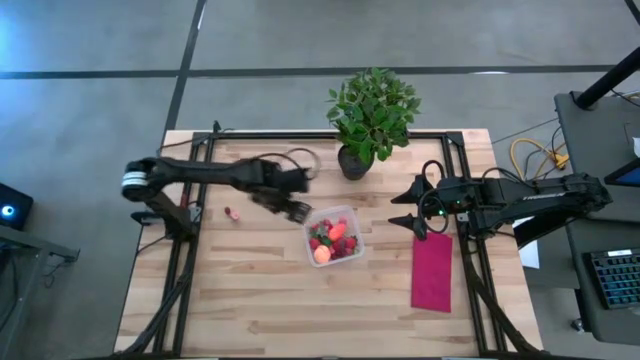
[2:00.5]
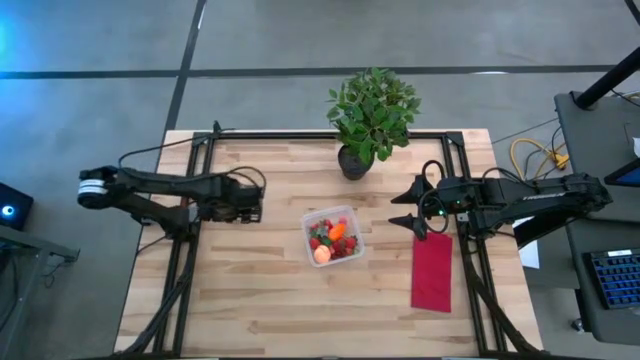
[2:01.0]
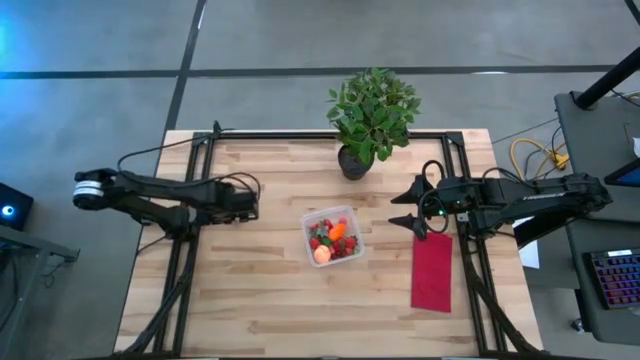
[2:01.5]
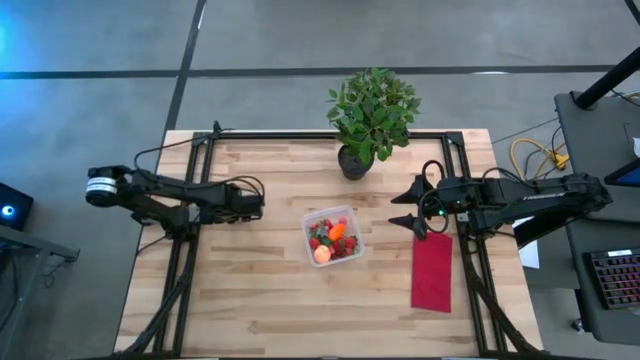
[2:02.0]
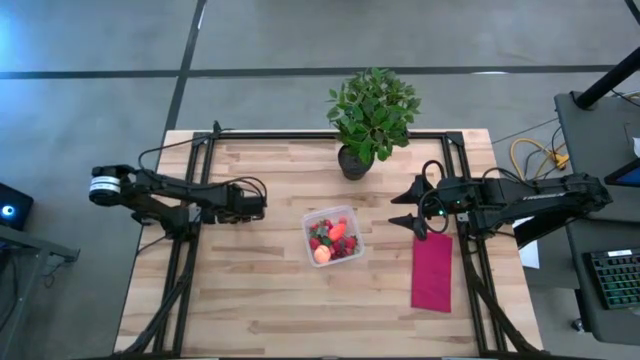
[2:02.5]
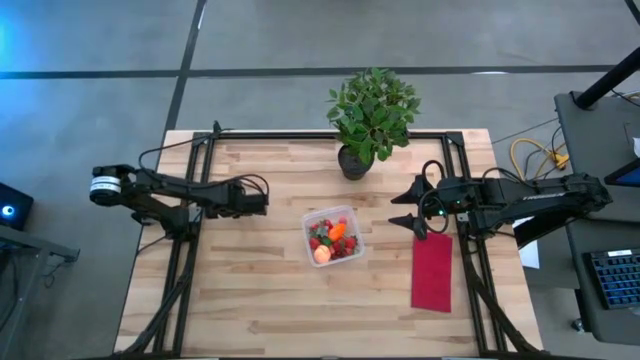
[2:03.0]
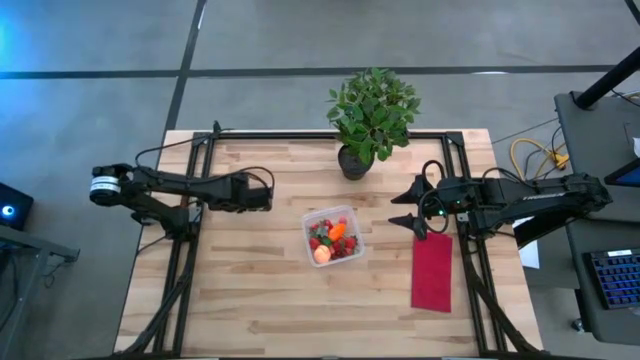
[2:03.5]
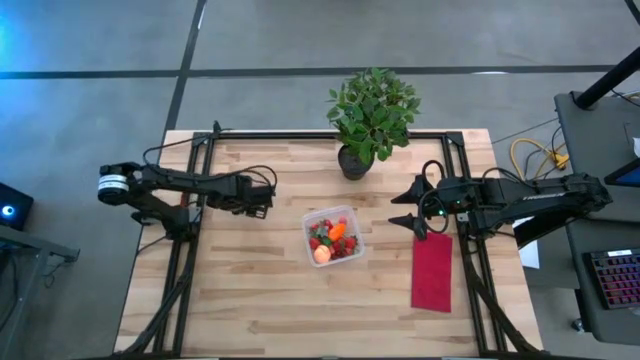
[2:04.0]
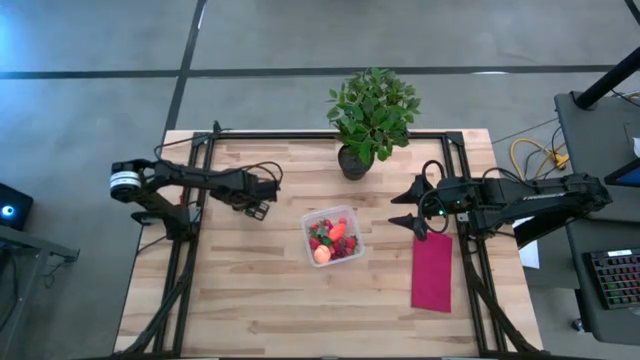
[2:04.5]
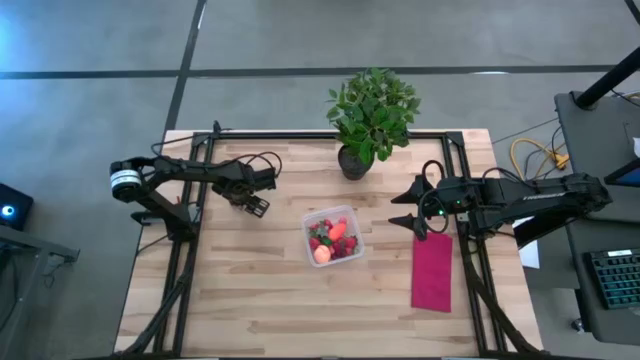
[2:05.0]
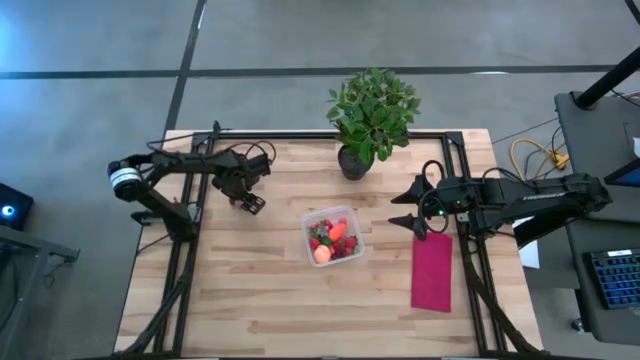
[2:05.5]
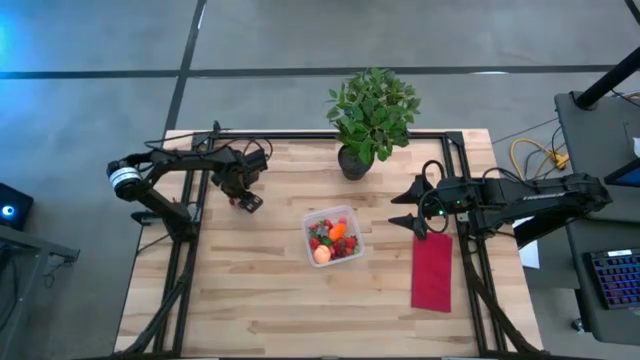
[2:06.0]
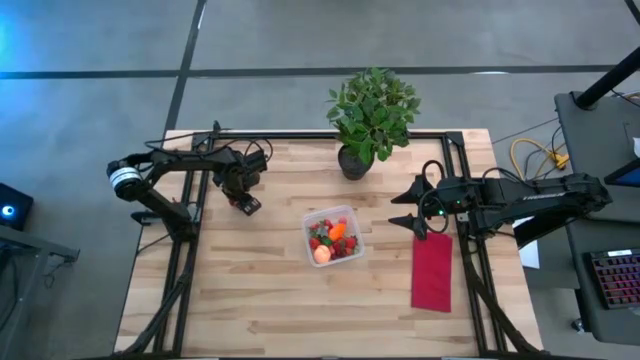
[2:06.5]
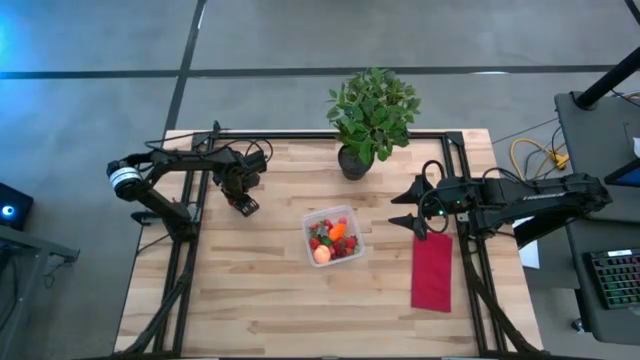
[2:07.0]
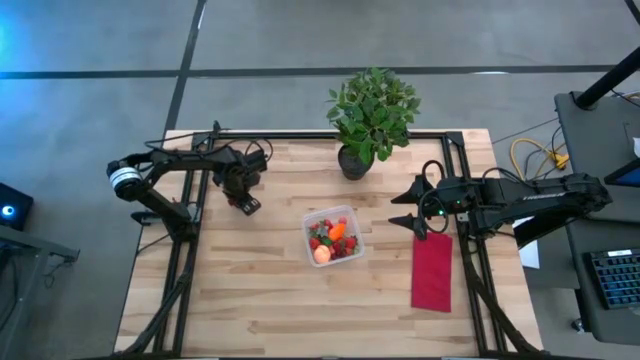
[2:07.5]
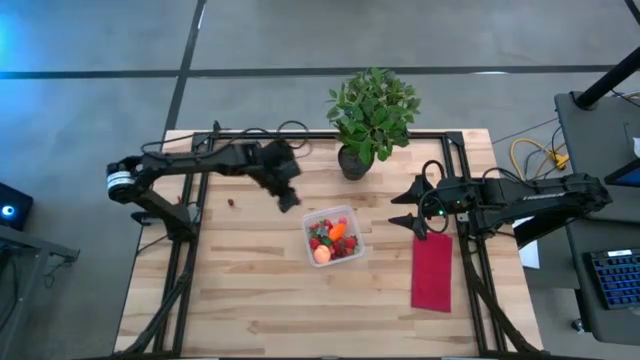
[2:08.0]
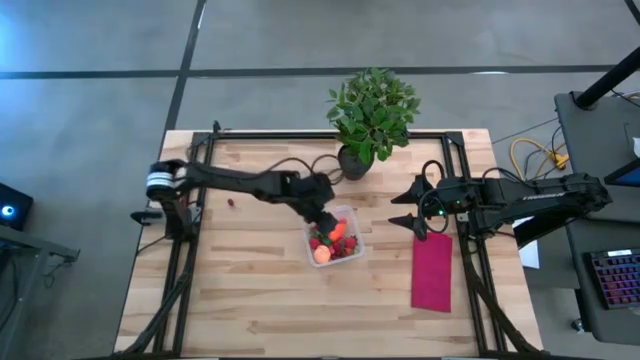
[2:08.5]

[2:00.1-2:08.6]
Task: Pick and placing Produce into tupperware
Put the pink peach into the transparent bin

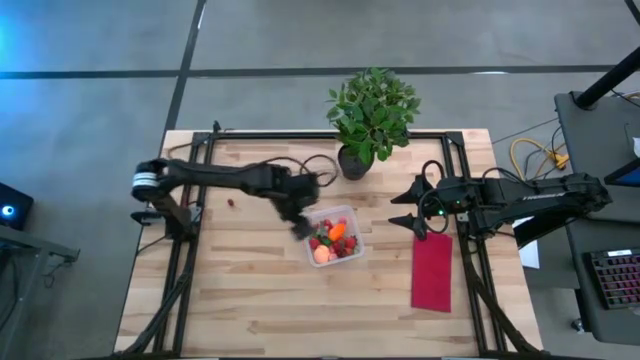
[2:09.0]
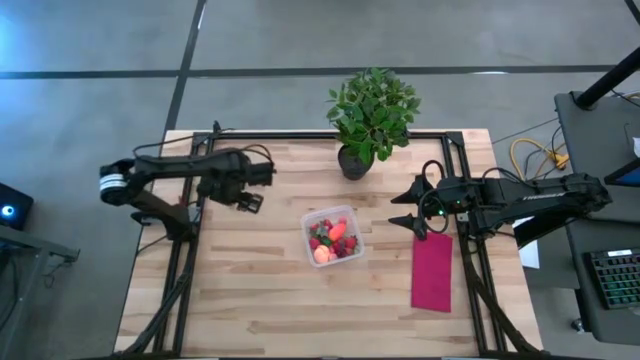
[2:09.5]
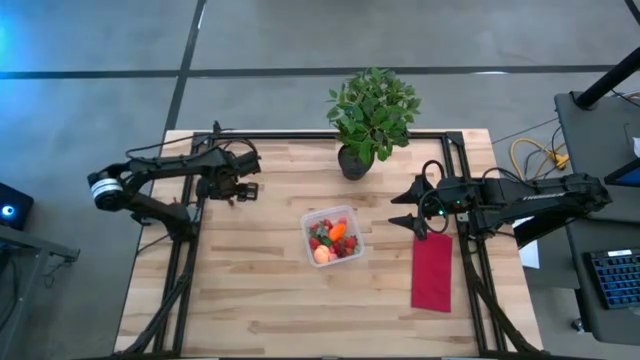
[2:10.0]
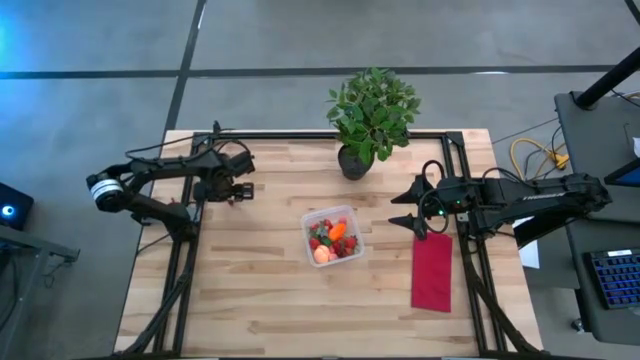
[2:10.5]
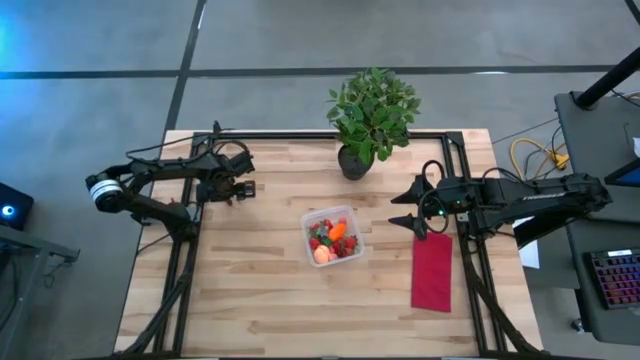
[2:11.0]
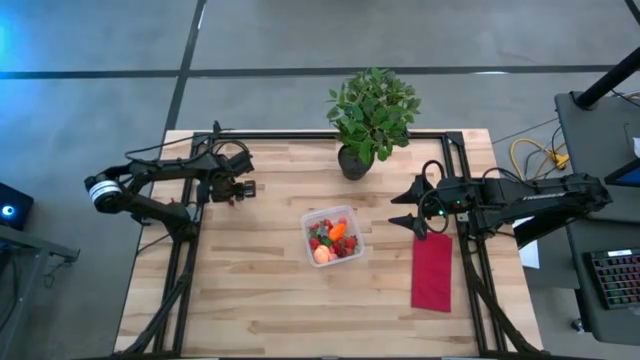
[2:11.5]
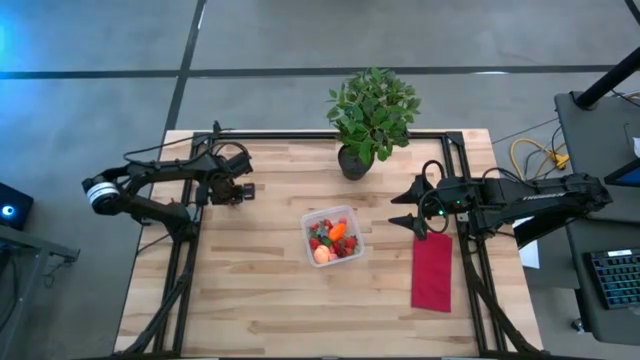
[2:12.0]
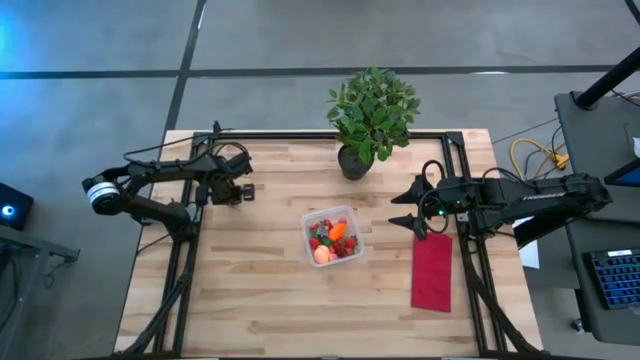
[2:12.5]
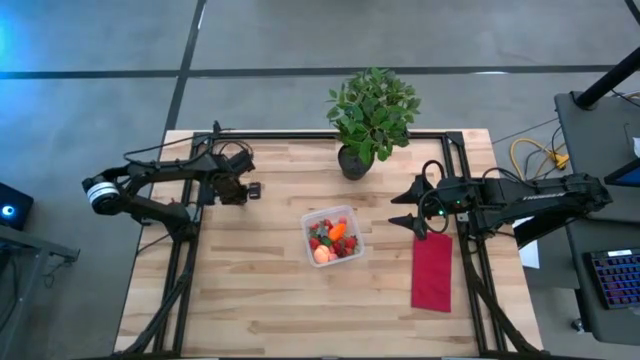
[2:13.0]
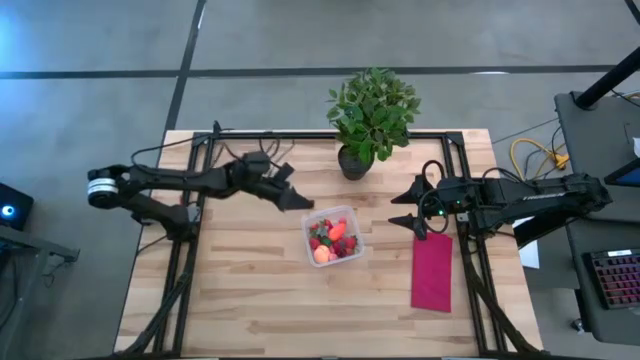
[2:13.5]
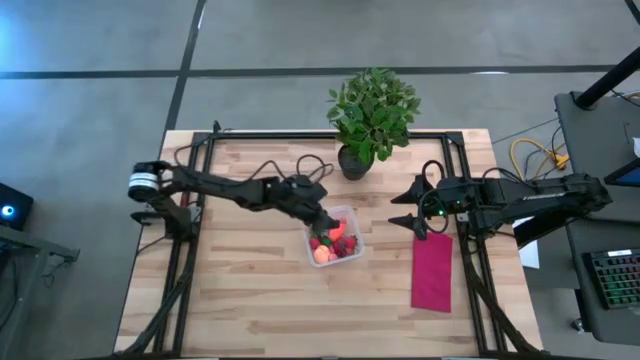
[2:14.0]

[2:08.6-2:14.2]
Put the red cherry into the transparent bin

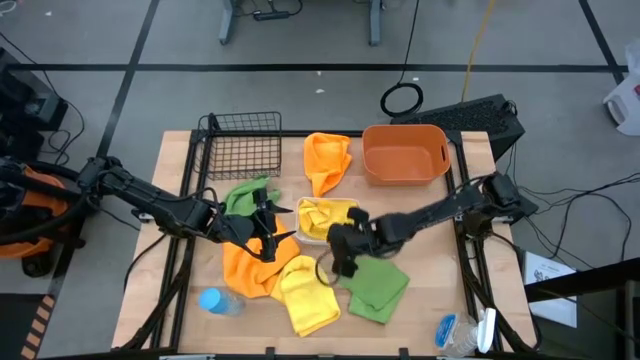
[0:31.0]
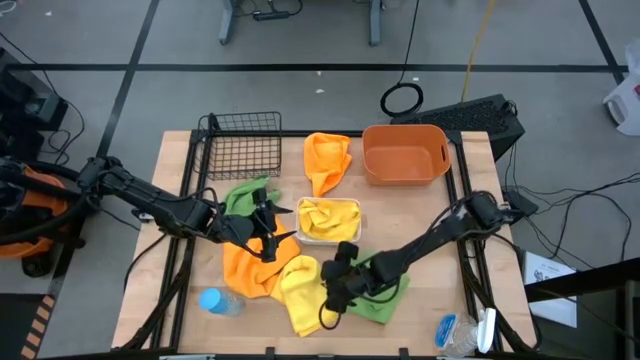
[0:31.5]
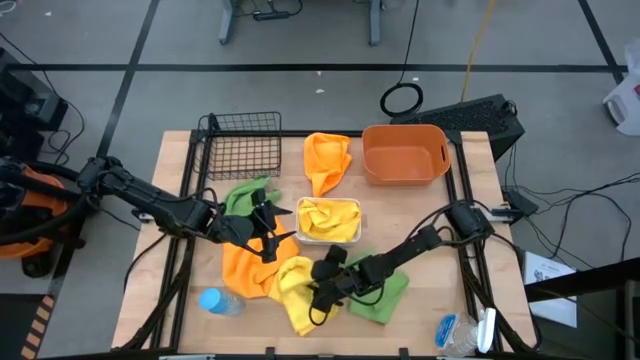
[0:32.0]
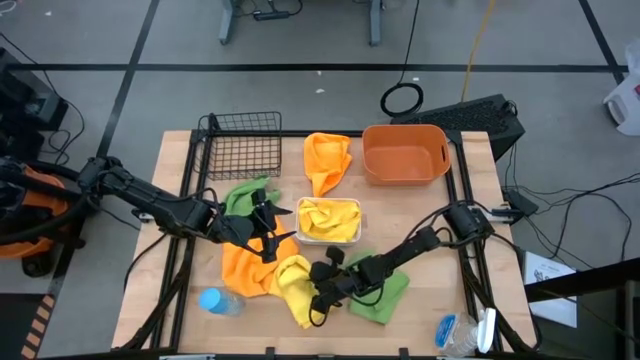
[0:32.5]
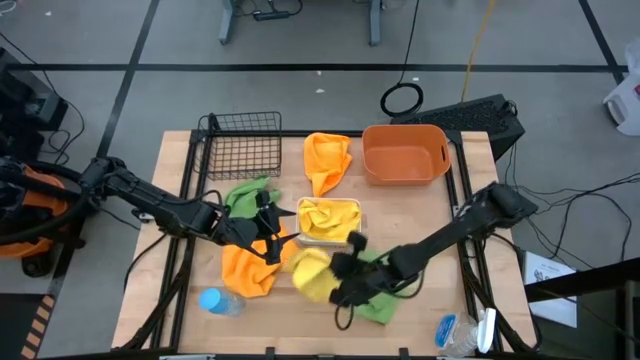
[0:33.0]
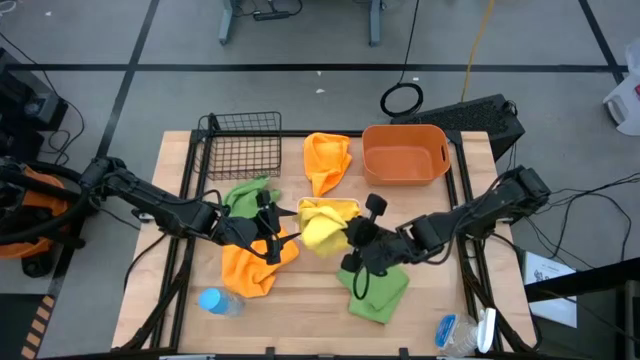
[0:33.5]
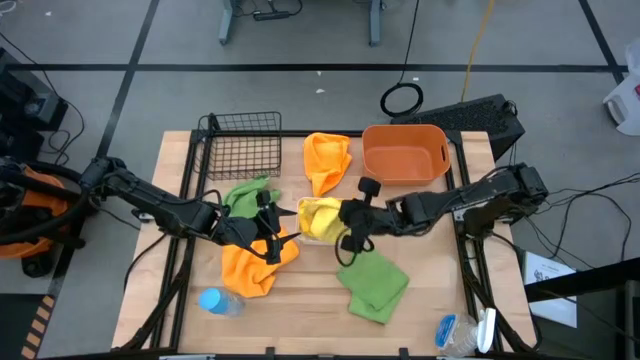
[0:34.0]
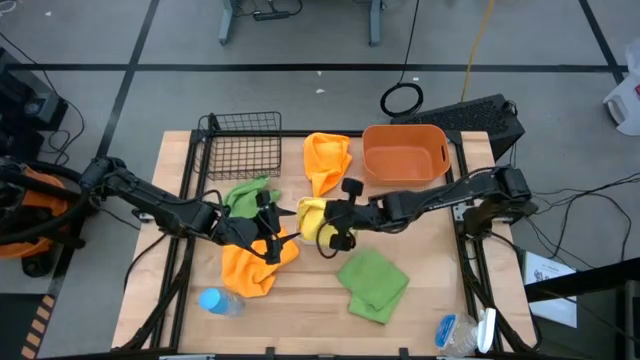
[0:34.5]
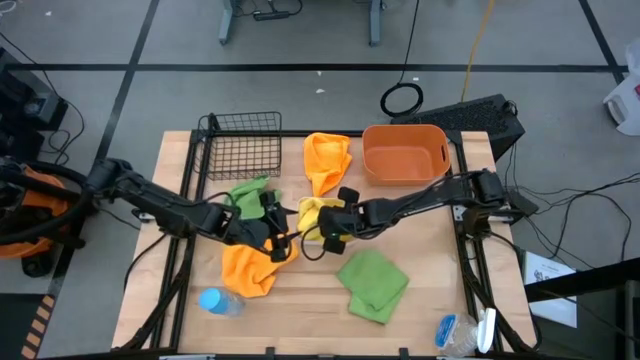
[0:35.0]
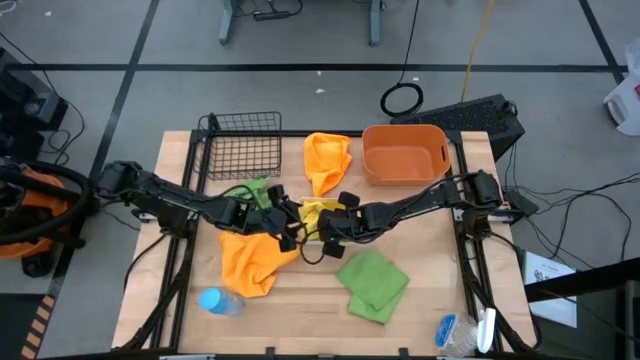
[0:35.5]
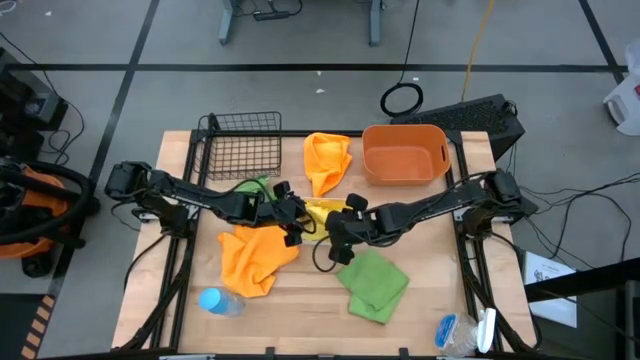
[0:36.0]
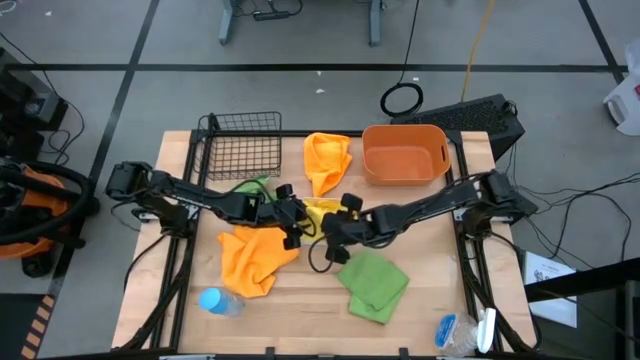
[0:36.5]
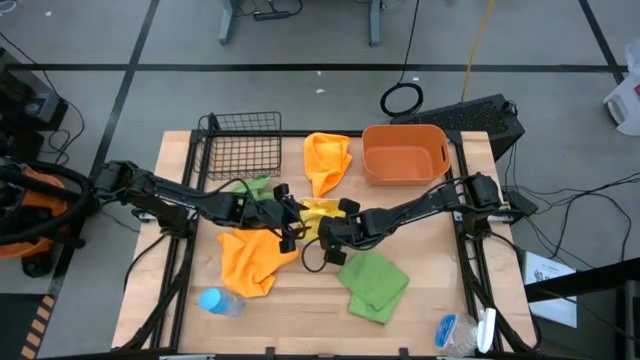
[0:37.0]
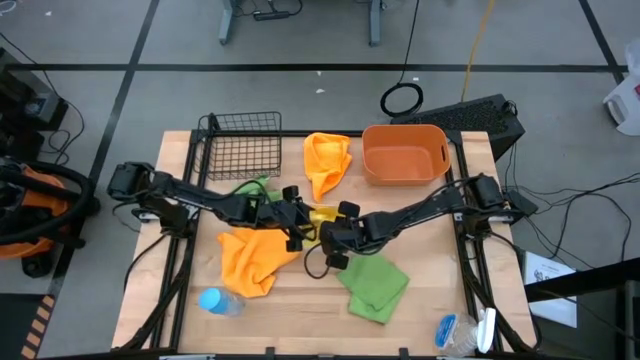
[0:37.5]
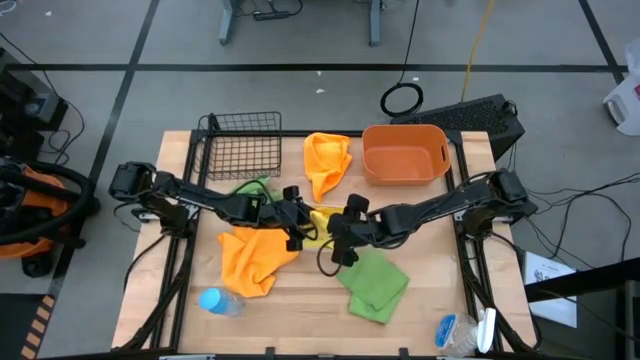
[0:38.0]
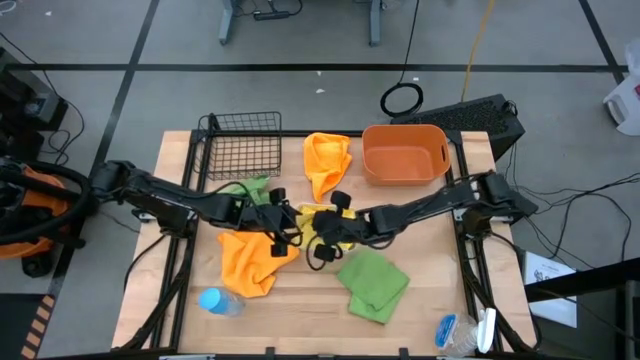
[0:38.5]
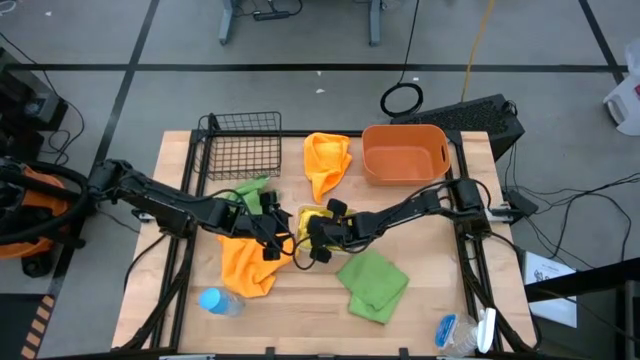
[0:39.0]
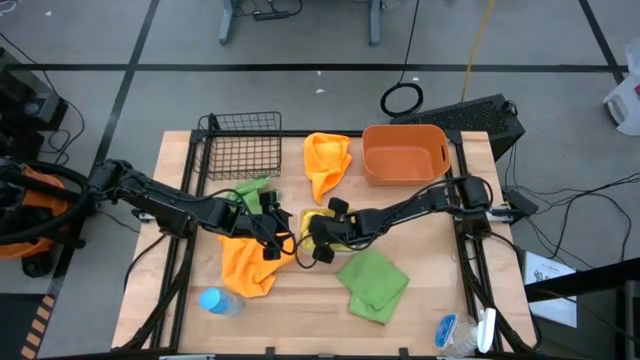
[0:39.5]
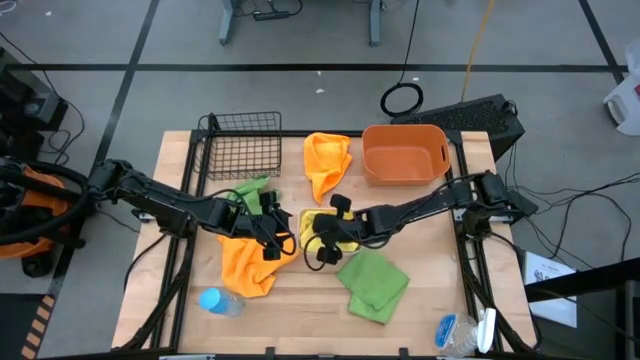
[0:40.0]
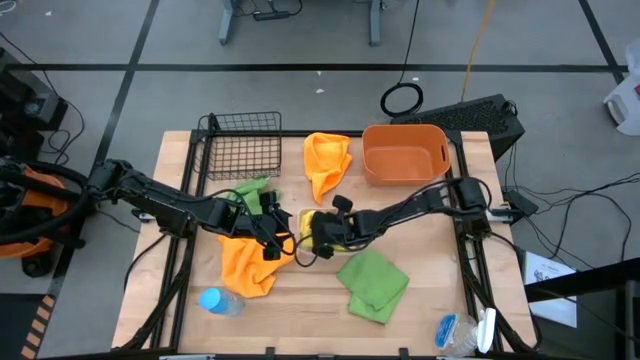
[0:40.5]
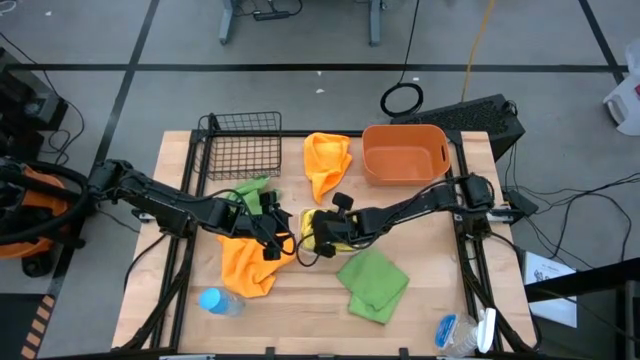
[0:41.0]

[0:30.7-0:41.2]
Task: Sort microfiber towel by color & place in baskets
Put the yellow microfiber towel into the white bin
